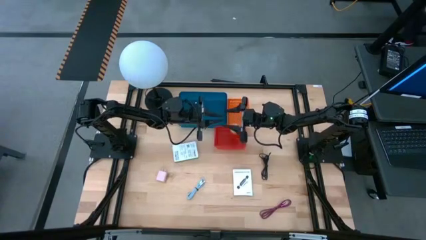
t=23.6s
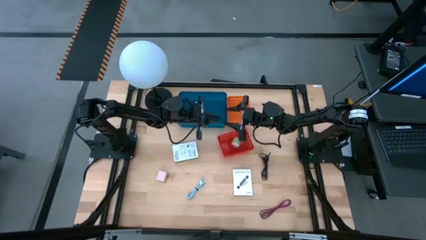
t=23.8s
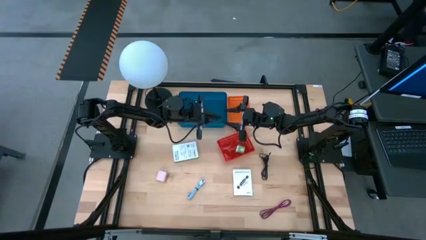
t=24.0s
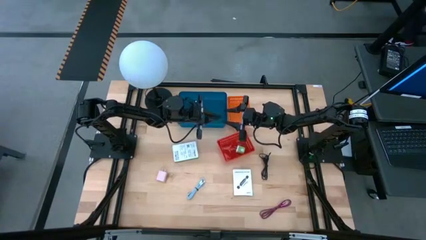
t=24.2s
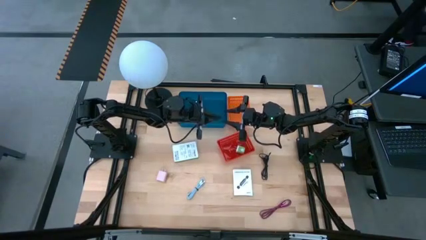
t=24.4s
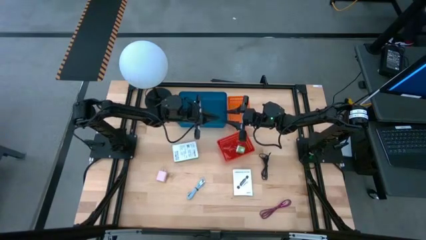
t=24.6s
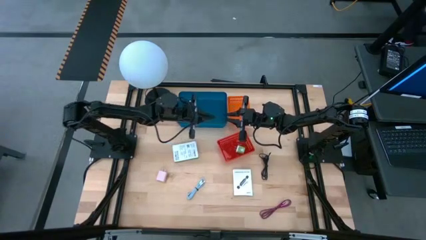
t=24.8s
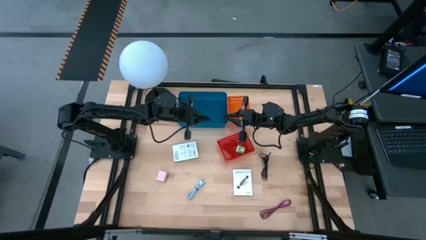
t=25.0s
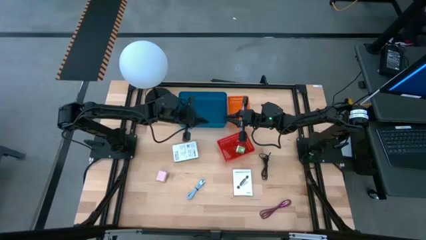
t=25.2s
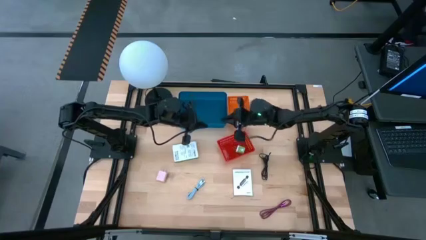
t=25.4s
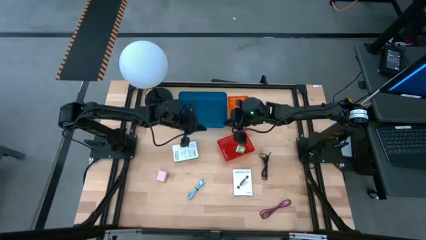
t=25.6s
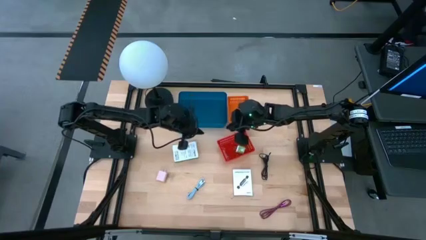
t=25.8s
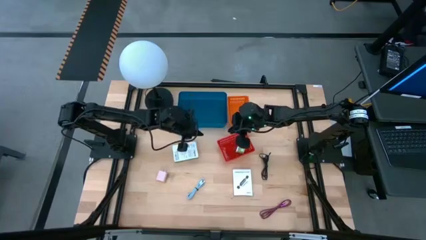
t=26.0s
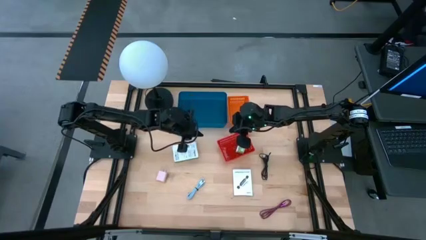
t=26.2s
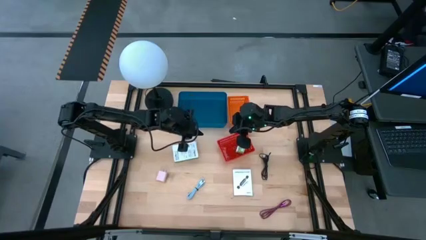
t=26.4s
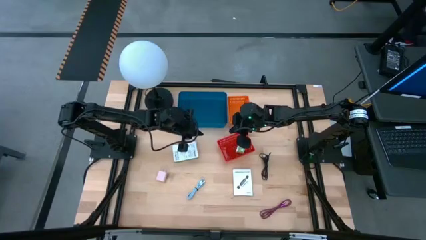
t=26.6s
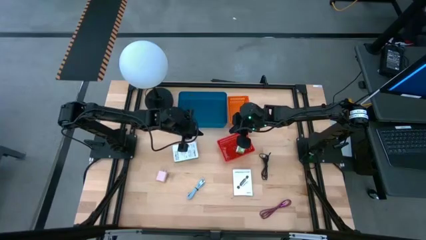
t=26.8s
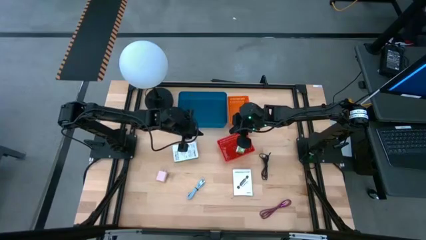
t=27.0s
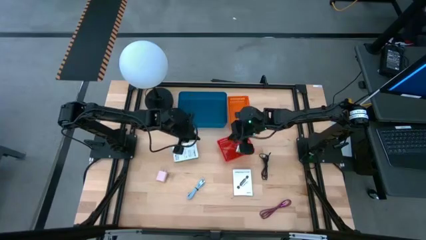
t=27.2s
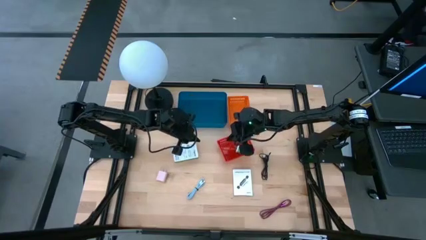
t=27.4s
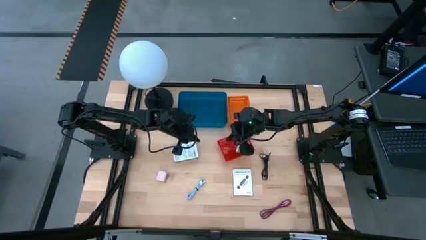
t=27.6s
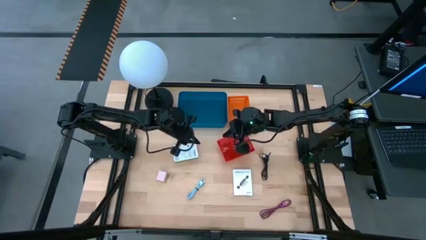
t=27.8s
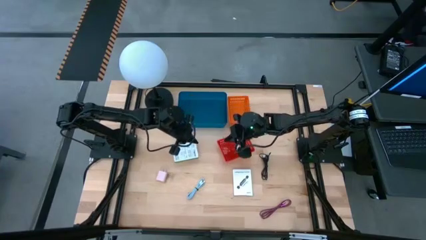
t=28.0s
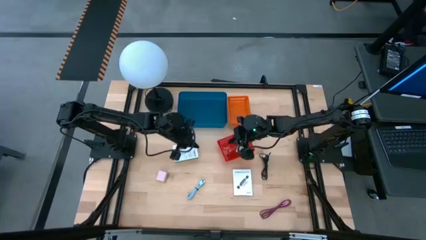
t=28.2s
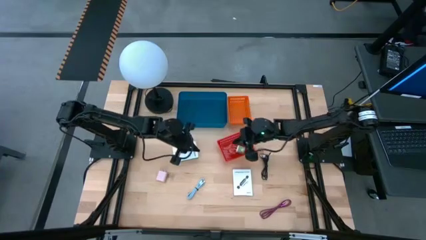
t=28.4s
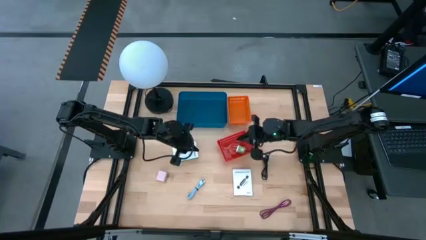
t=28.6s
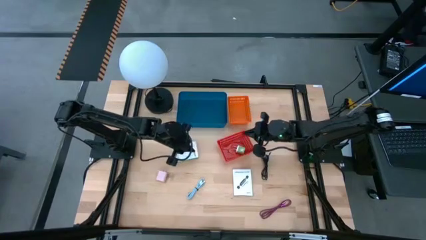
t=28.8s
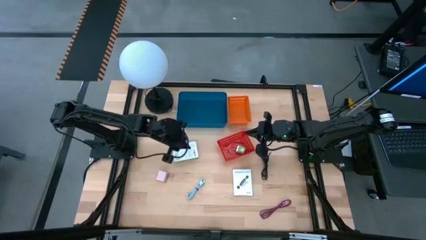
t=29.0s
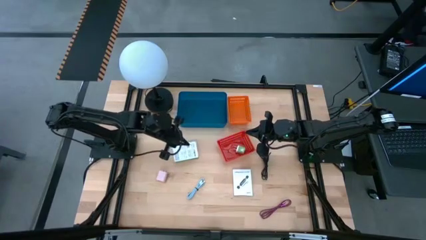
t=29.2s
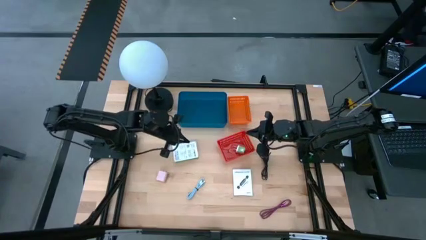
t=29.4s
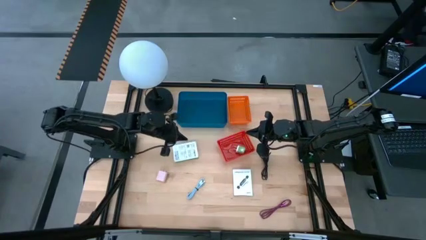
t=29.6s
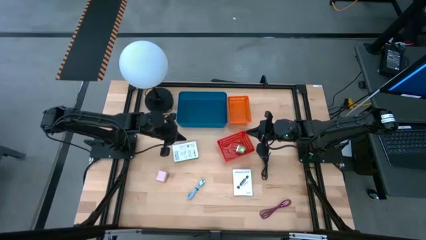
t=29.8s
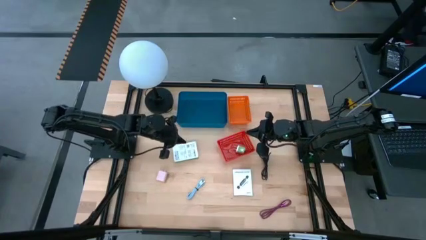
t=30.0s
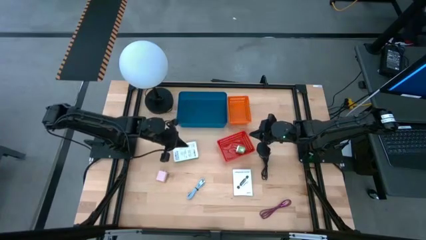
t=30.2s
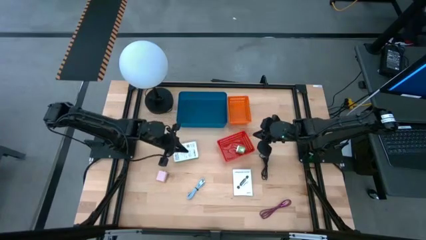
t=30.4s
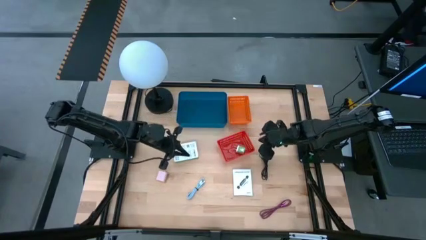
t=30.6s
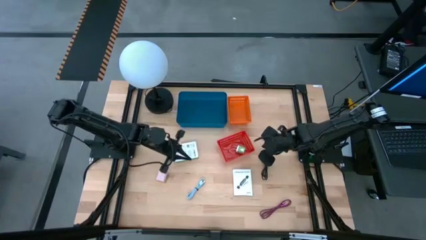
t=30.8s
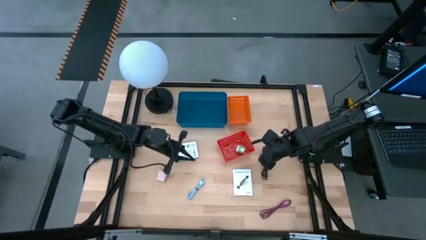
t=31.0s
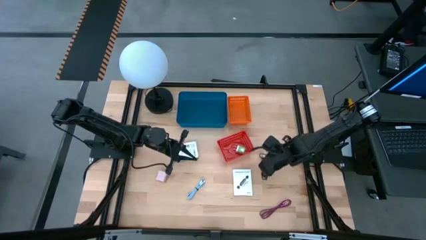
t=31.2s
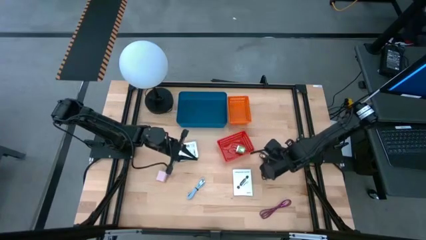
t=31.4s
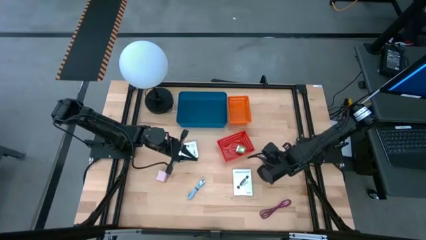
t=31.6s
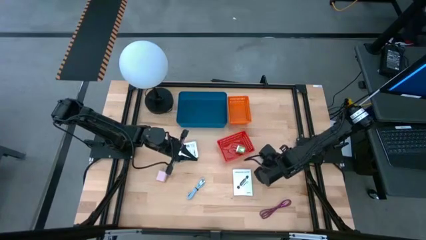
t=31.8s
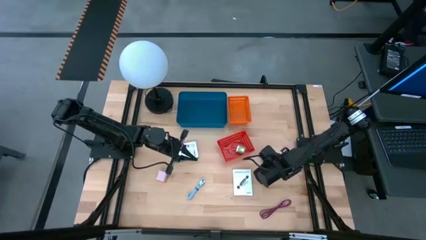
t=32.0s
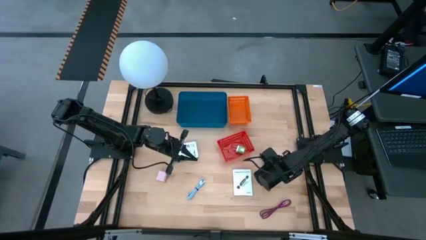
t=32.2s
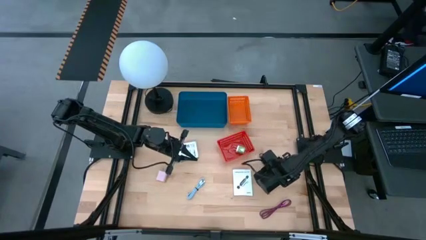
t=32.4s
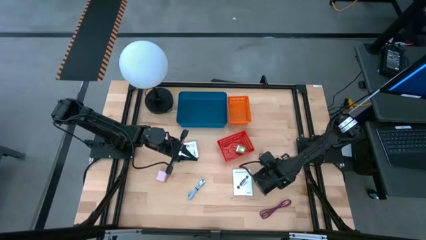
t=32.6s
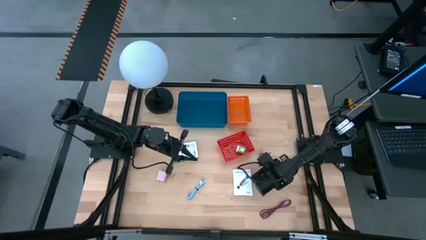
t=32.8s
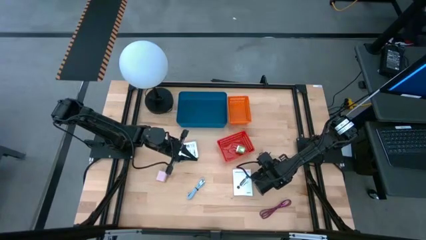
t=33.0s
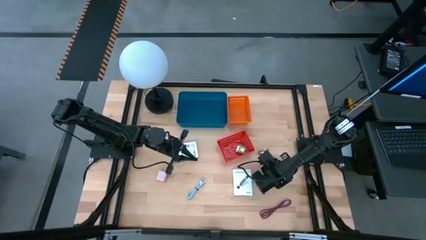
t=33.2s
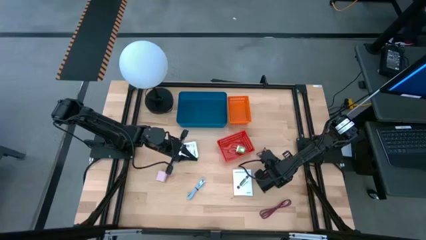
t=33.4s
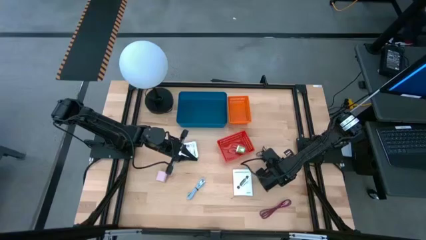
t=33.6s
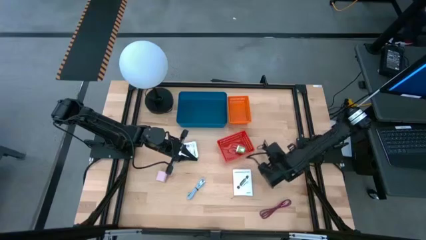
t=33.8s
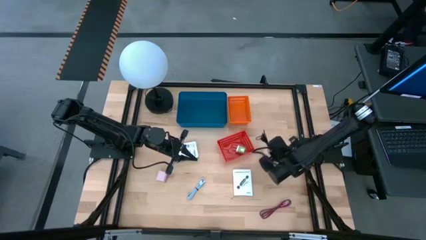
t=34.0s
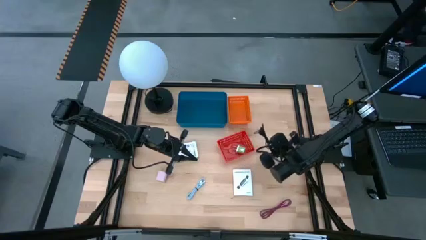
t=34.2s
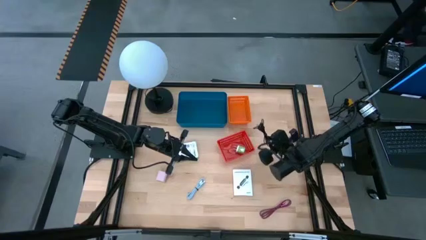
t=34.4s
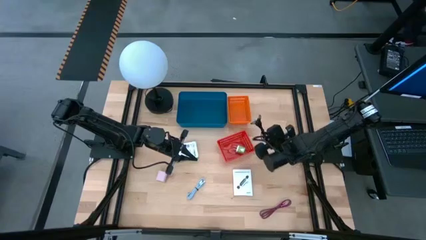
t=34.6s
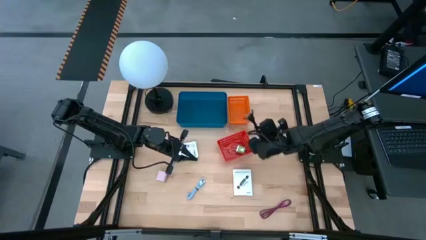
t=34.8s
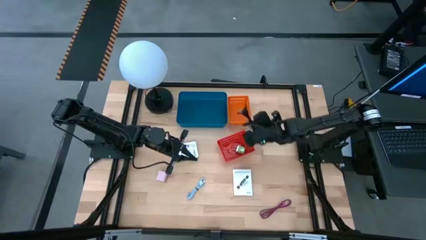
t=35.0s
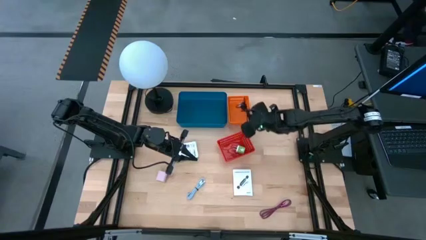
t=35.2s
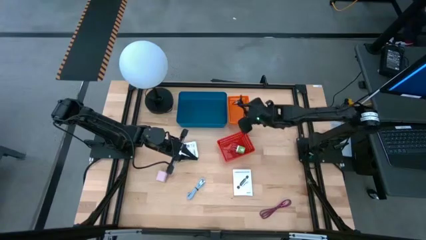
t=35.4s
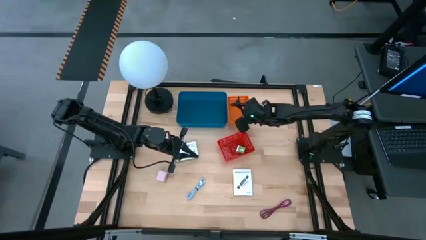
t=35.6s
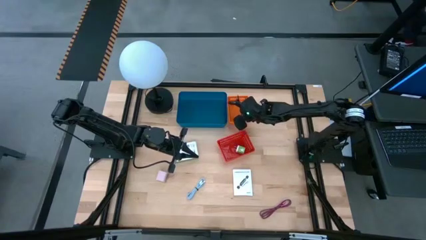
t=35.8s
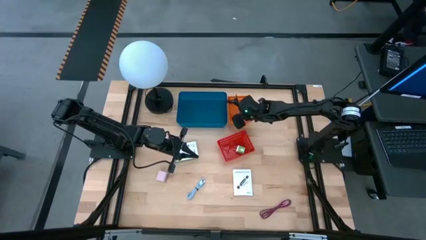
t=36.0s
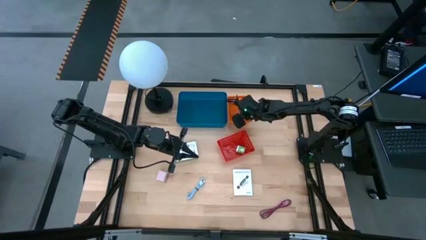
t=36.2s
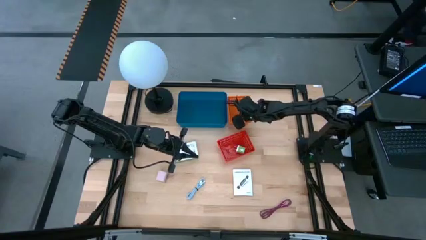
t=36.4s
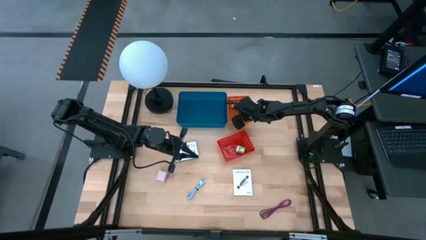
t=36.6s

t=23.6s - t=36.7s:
Task: Pick and place items into bin
Put the black charger cable into the orange bin
